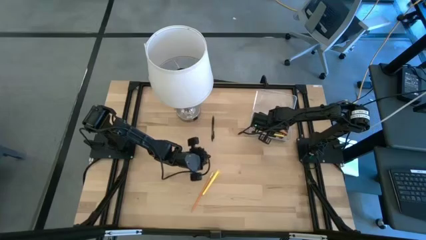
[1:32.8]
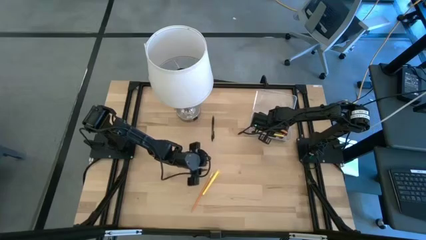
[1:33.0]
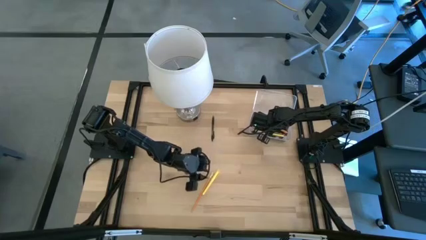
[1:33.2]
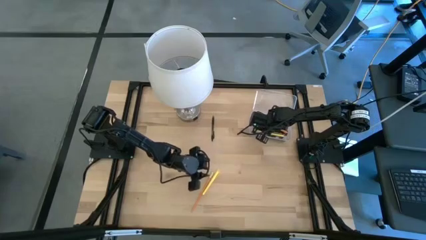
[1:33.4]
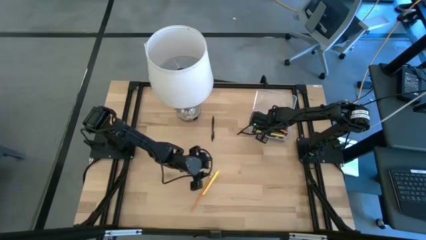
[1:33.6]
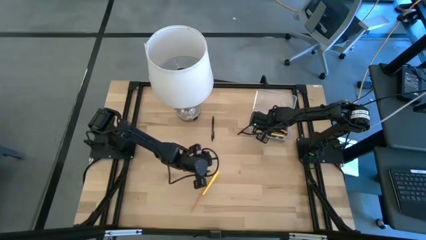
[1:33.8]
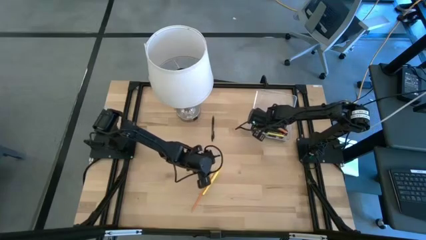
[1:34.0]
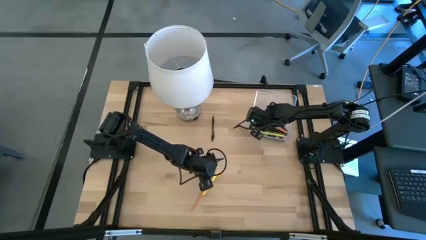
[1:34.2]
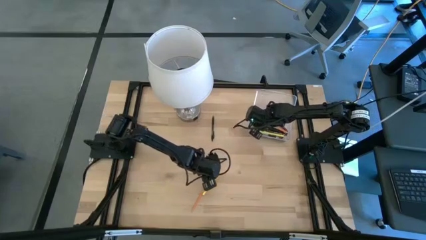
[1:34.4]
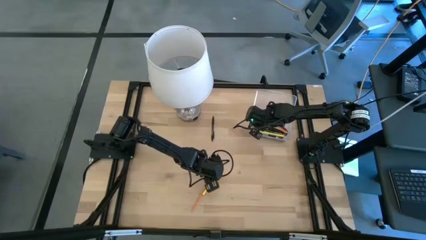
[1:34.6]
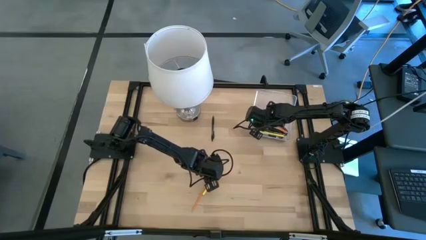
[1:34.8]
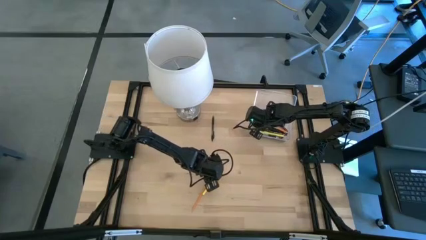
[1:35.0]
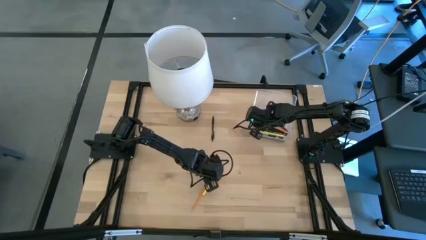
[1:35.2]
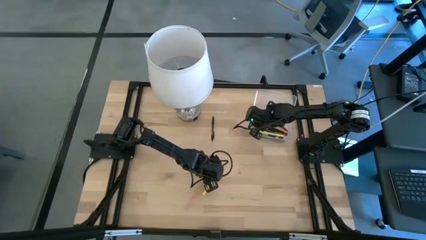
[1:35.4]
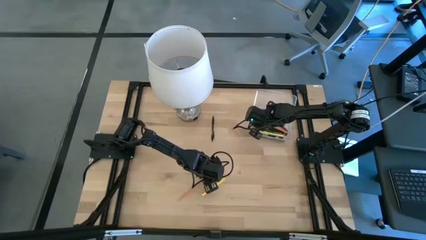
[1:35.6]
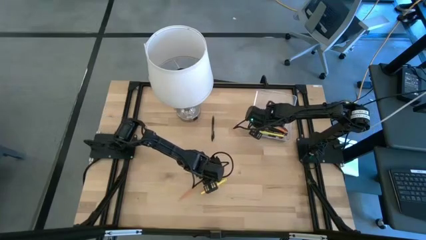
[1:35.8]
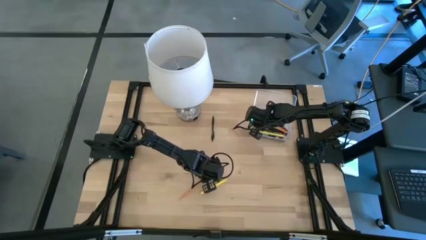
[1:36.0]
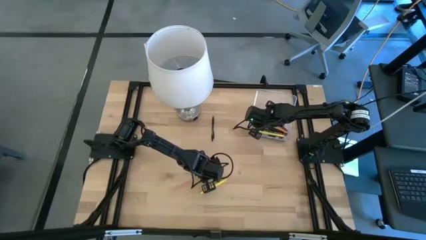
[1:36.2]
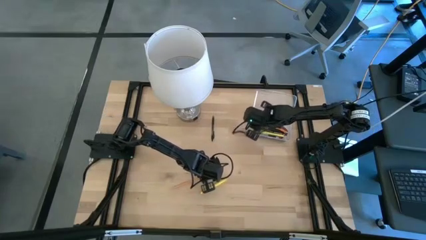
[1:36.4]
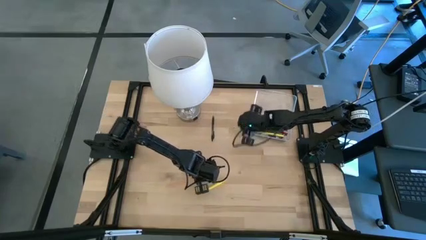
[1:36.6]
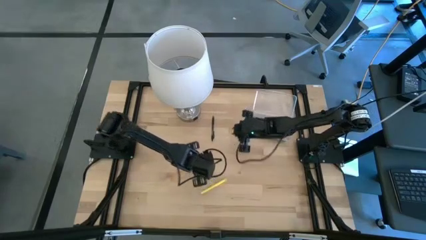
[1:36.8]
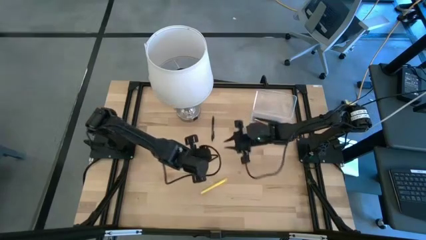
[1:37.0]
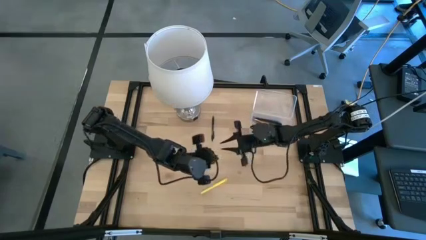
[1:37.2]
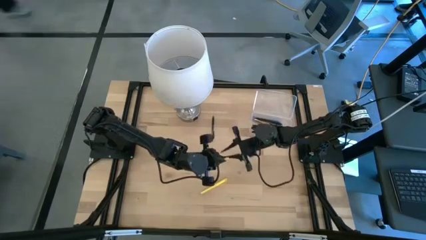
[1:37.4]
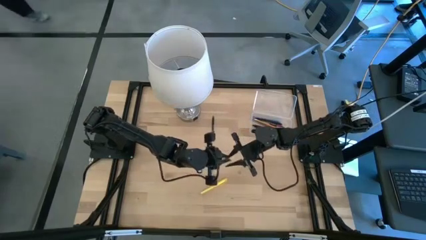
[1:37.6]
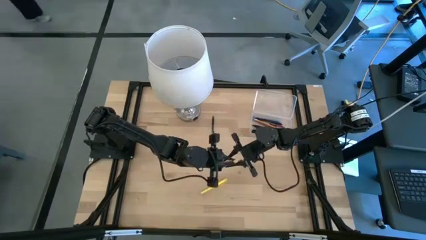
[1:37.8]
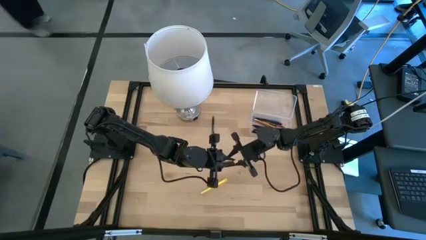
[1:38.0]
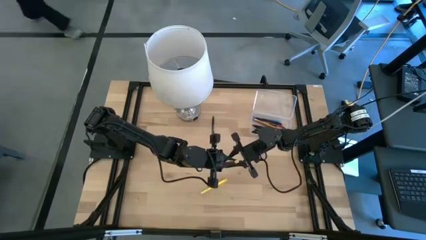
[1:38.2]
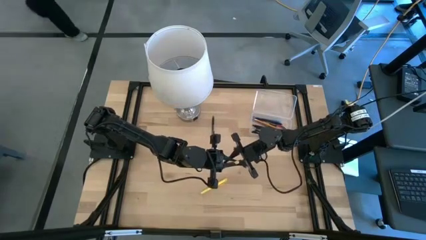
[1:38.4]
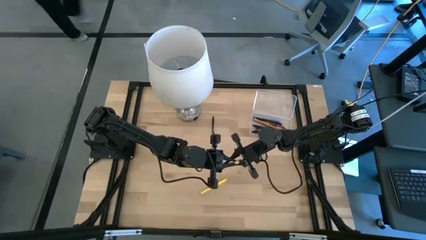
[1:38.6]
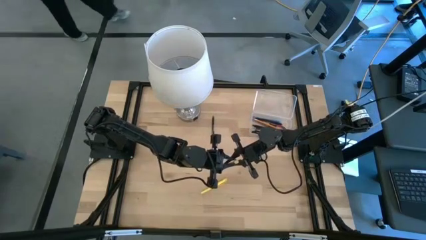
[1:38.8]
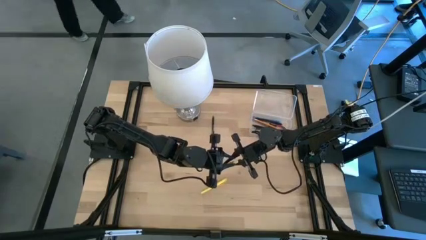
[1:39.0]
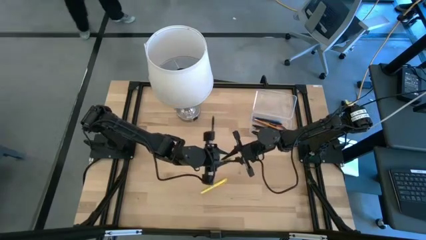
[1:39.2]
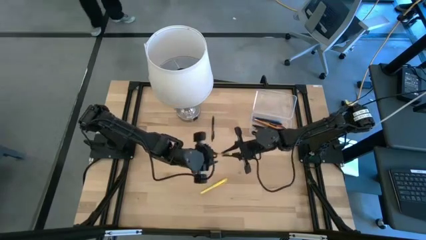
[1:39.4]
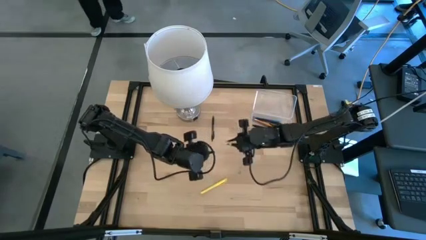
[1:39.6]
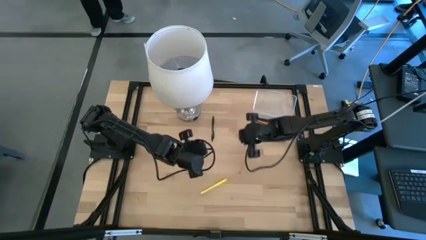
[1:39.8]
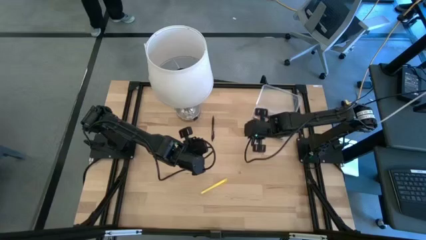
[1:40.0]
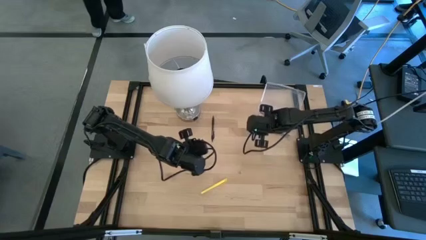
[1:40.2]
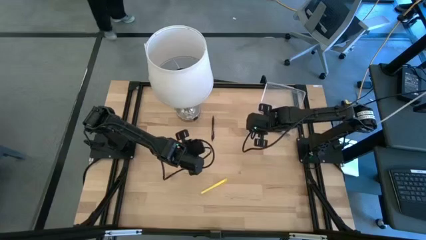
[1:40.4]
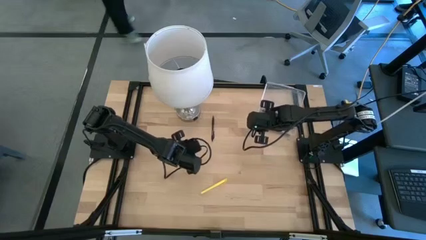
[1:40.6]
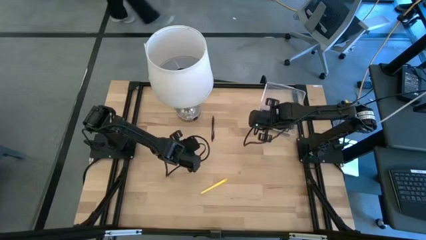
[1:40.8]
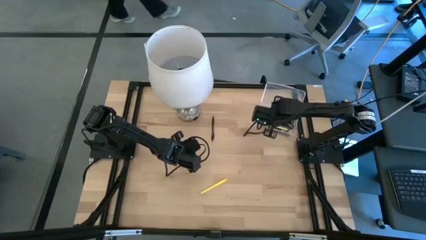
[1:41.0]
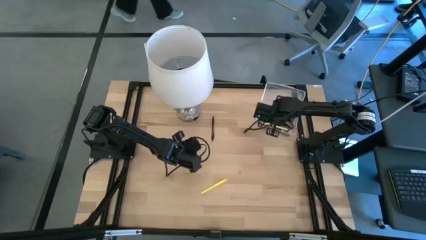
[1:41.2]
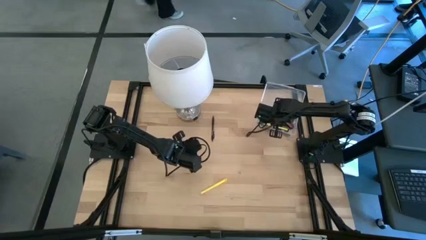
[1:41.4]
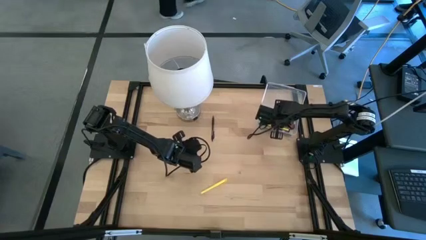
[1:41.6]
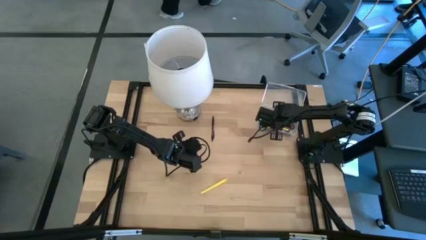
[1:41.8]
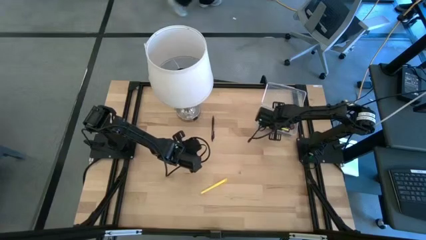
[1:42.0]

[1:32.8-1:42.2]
Task: Pick & place school supplies into a supply box
Put the yellow pencil into the transparent supply box

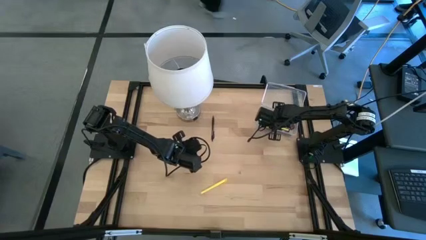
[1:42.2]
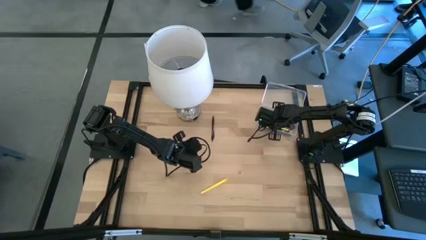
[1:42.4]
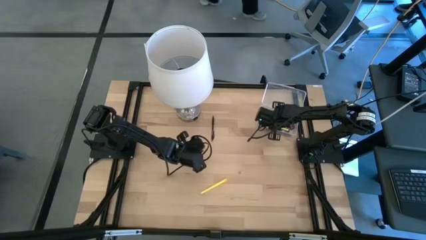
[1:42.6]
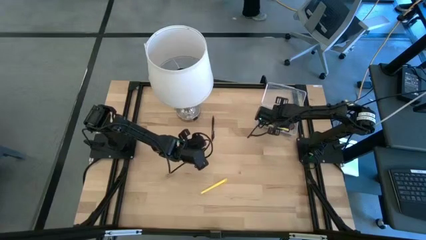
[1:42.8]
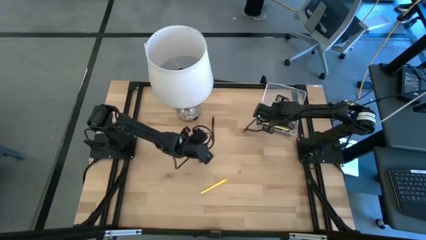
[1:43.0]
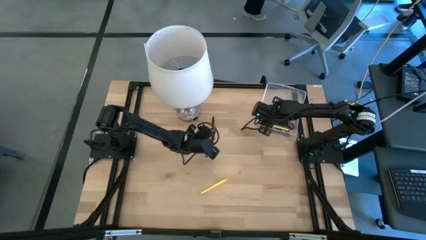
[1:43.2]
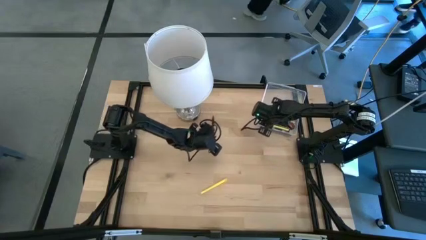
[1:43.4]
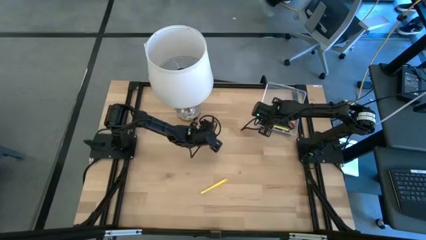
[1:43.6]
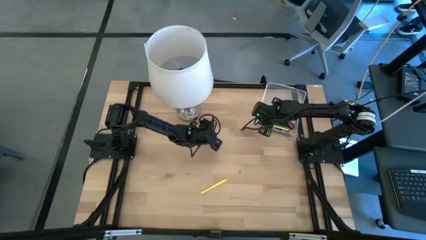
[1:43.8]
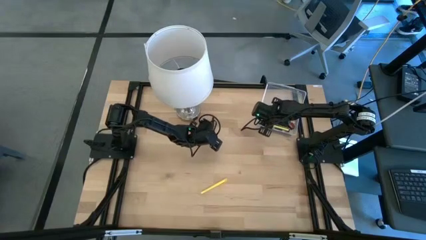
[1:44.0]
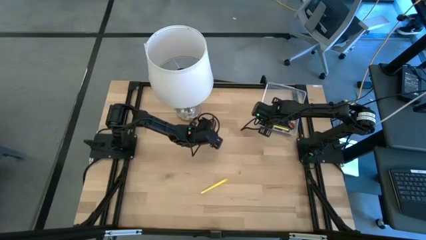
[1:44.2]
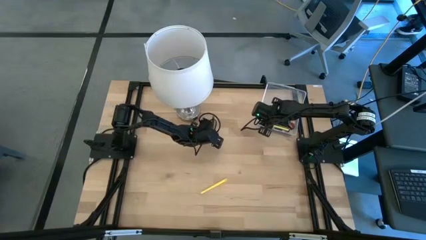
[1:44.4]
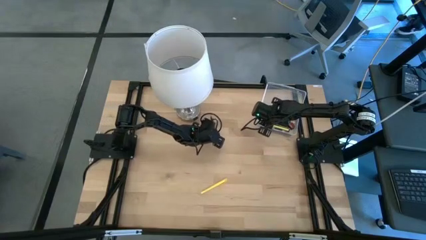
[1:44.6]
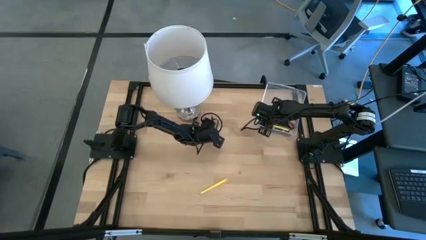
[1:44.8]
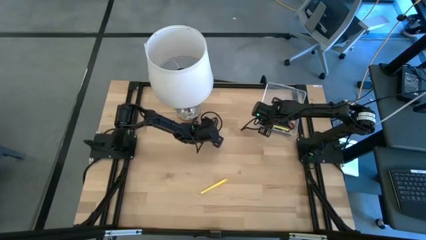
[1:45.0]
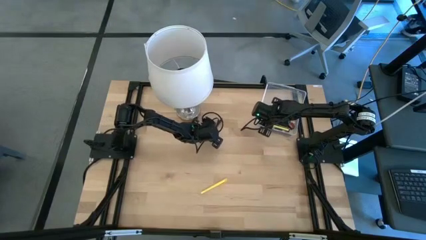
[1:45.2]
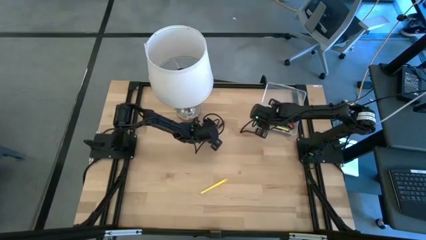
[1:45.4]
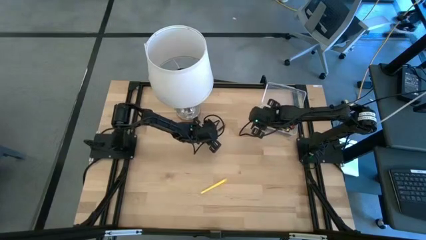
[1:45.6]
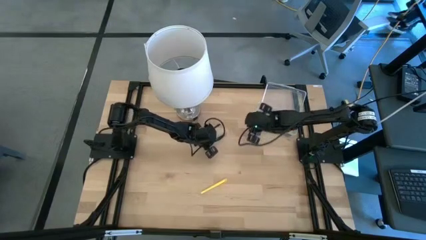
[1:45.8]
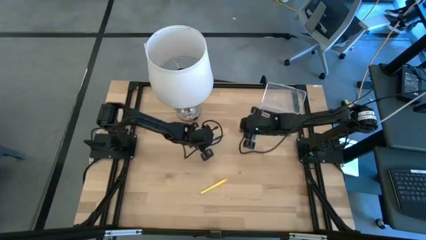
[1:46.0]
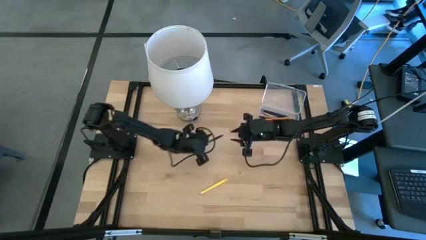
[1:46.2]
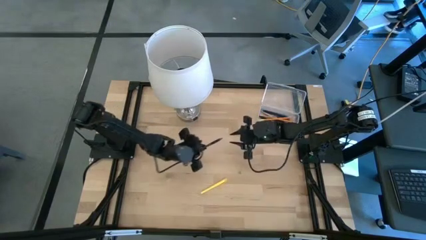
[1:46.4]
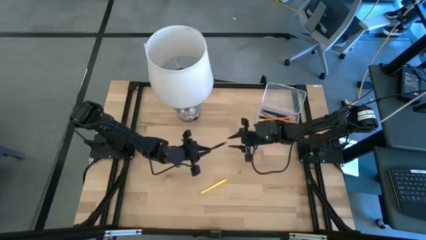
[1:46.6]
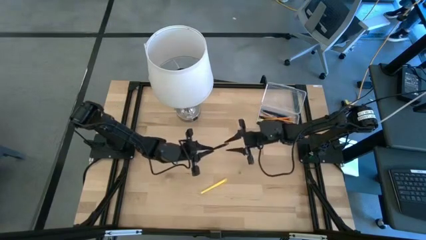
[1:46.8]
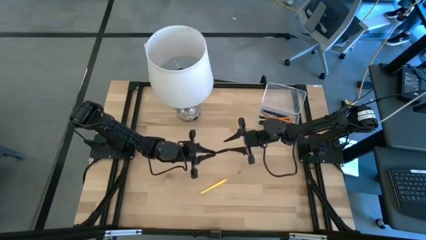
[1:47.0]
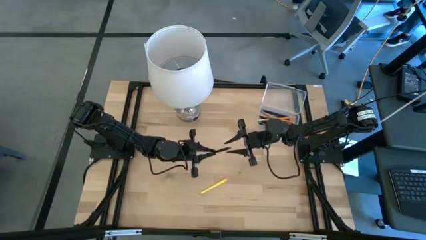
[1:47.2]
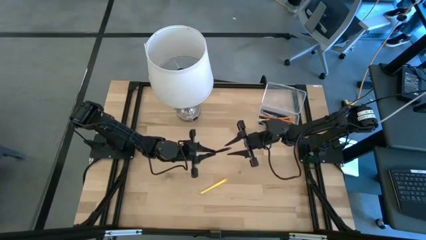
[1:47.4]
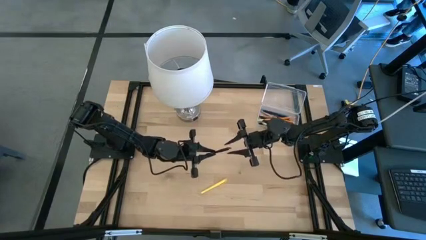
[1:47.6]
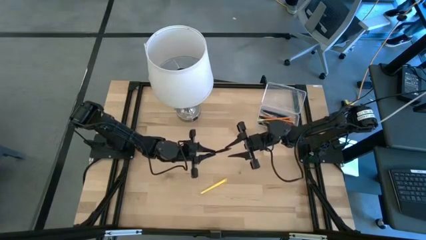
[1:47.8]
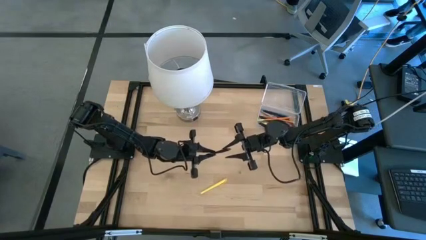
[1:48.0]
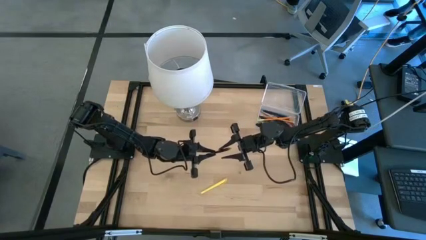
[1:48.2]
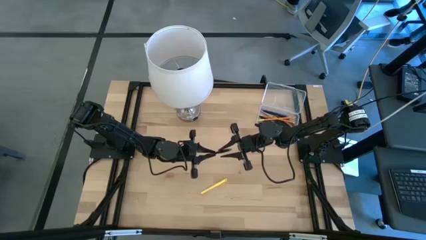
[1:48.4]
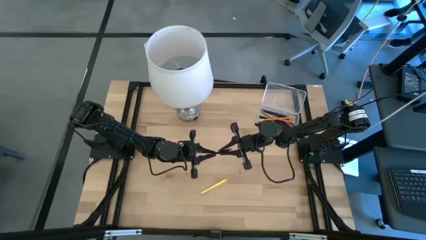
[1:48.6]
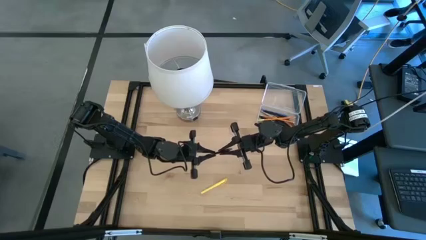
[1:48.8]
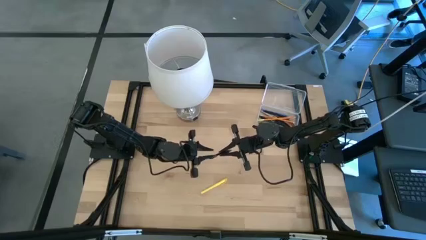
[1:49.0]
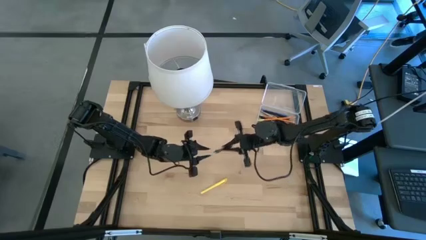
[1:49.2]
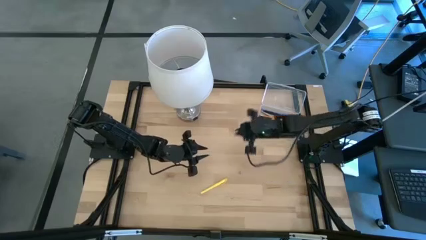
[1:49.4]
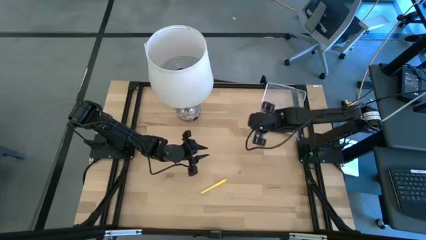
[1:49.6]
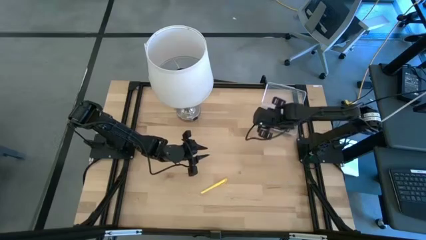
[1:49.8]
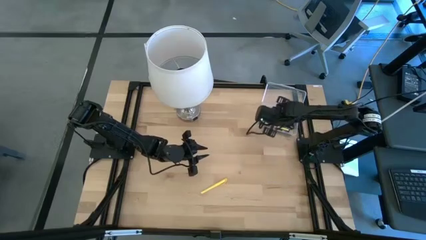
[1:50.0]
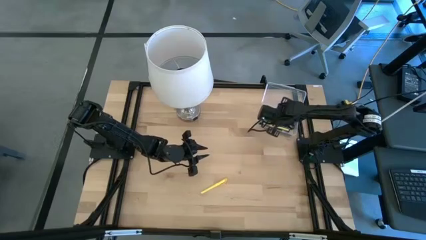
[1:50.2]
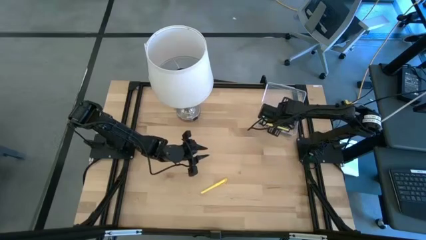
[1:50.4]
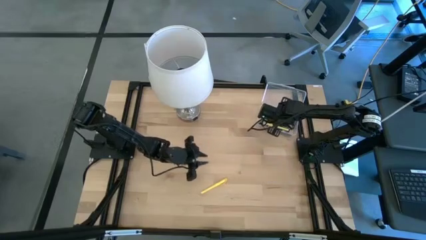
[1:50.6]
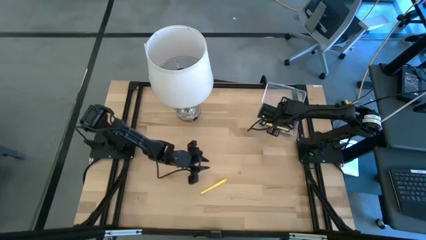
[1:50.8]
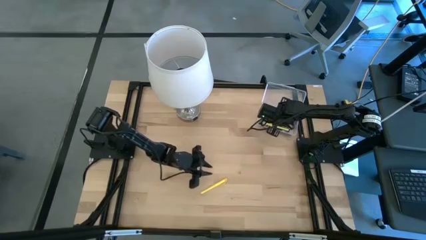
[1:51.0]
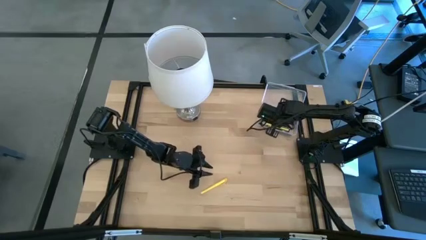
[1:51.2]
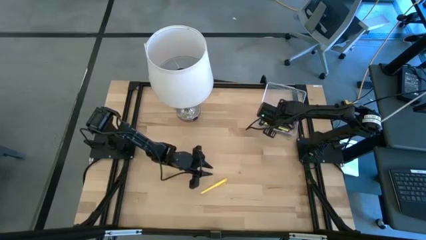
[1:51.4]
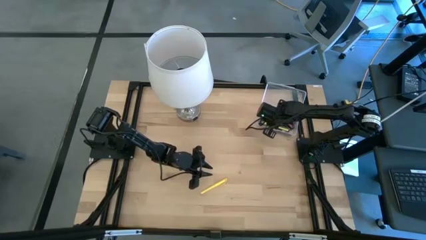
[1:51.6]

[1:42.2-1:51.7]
Put the black pen into the transparent supply box
